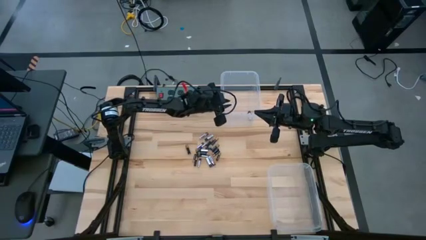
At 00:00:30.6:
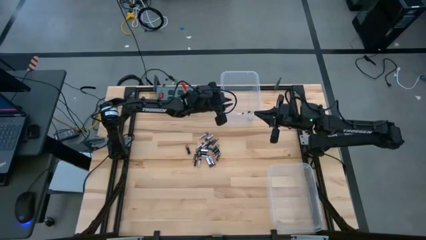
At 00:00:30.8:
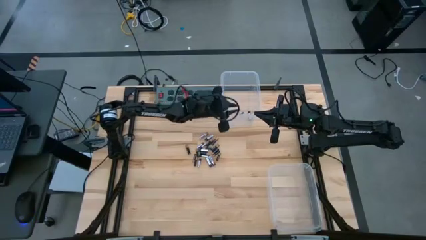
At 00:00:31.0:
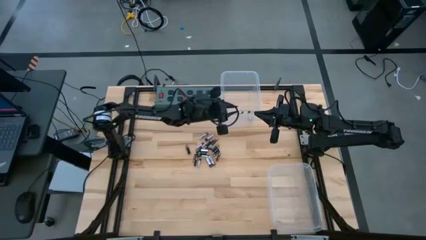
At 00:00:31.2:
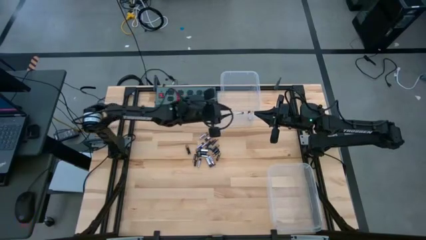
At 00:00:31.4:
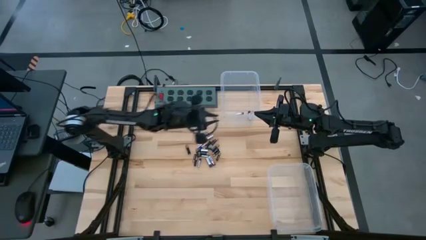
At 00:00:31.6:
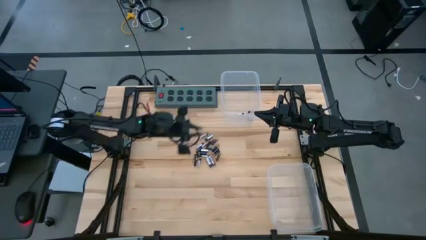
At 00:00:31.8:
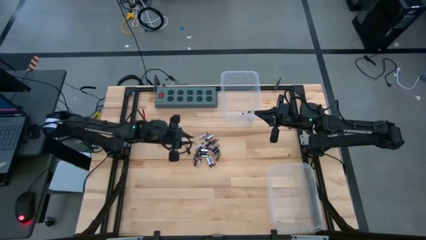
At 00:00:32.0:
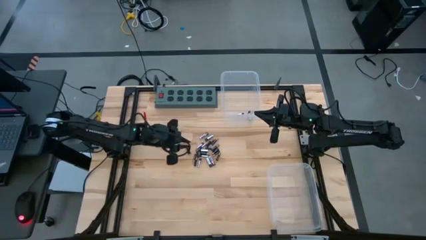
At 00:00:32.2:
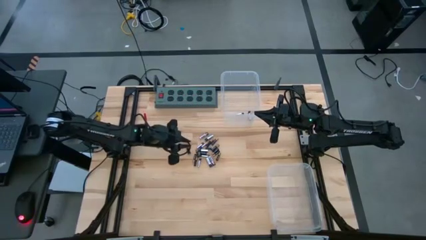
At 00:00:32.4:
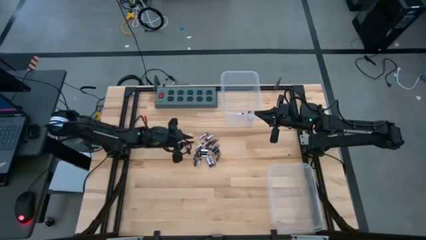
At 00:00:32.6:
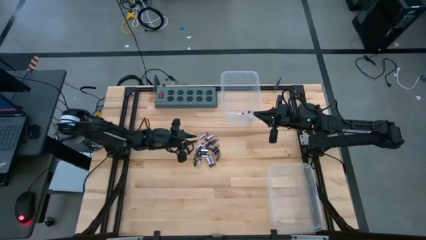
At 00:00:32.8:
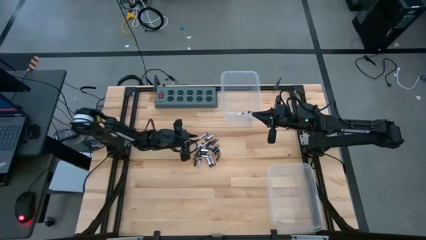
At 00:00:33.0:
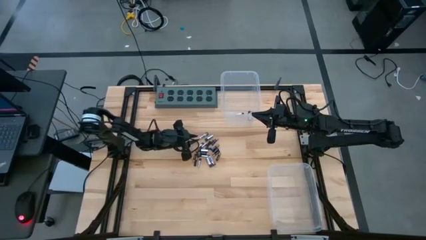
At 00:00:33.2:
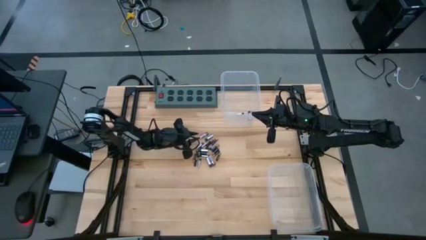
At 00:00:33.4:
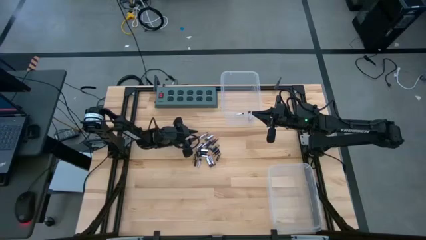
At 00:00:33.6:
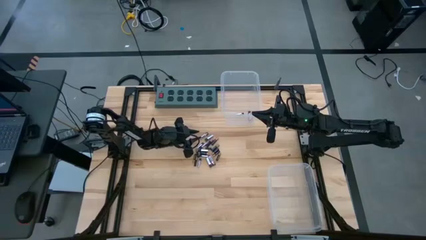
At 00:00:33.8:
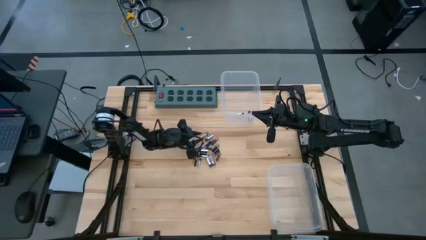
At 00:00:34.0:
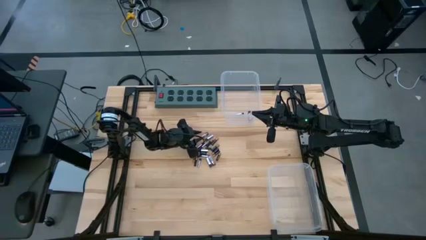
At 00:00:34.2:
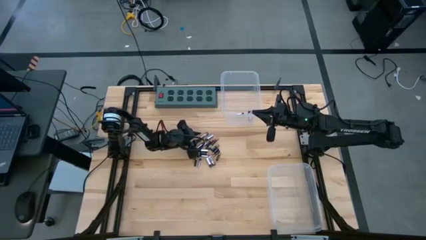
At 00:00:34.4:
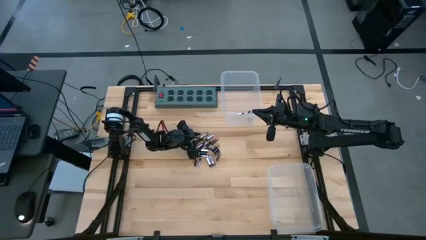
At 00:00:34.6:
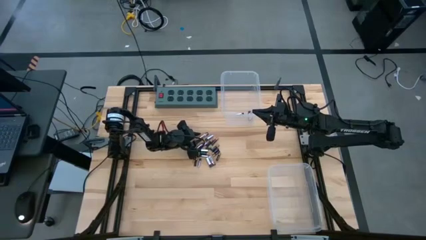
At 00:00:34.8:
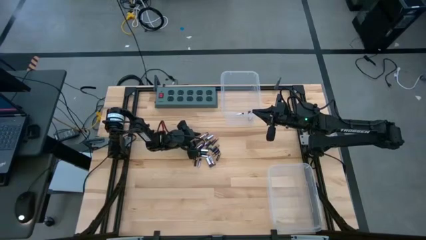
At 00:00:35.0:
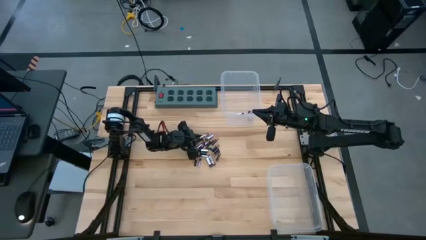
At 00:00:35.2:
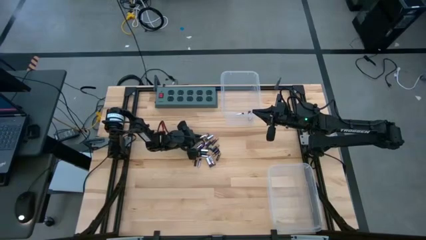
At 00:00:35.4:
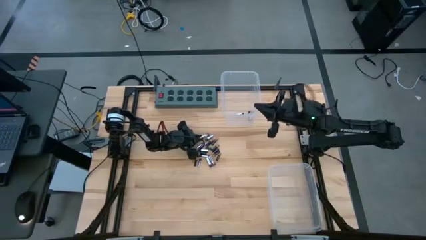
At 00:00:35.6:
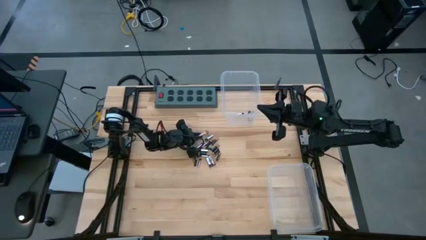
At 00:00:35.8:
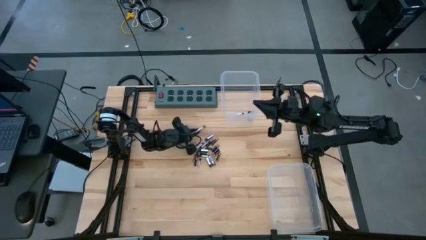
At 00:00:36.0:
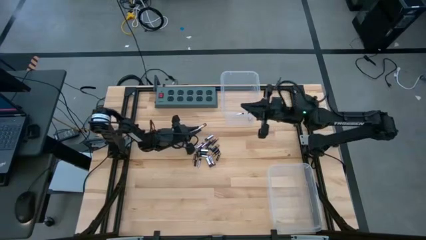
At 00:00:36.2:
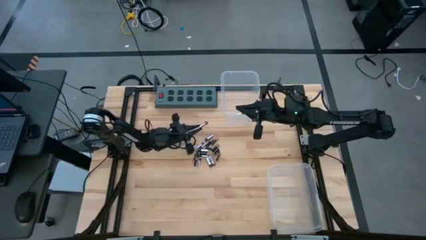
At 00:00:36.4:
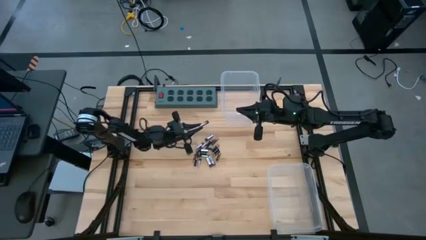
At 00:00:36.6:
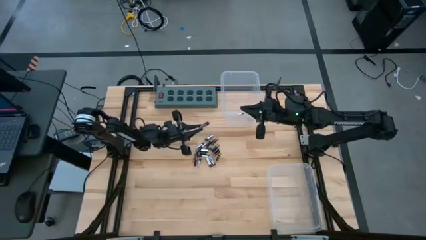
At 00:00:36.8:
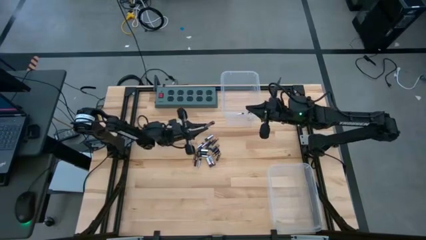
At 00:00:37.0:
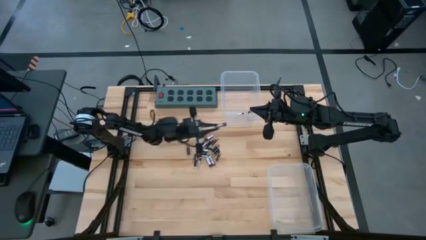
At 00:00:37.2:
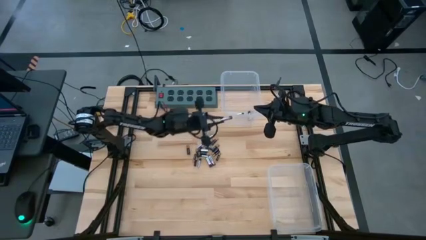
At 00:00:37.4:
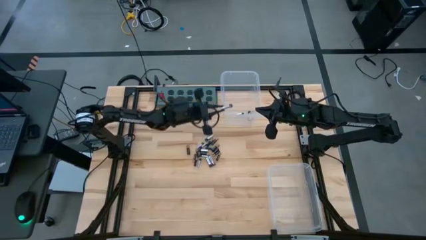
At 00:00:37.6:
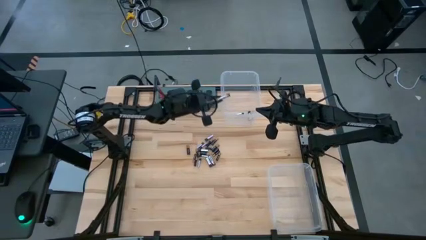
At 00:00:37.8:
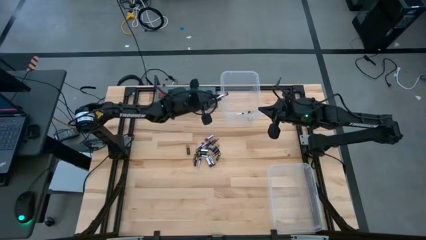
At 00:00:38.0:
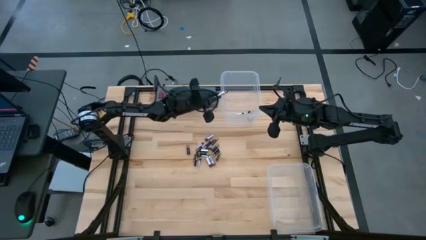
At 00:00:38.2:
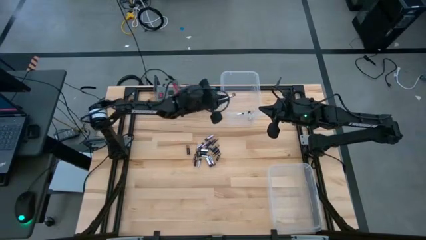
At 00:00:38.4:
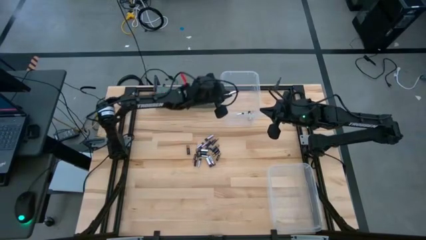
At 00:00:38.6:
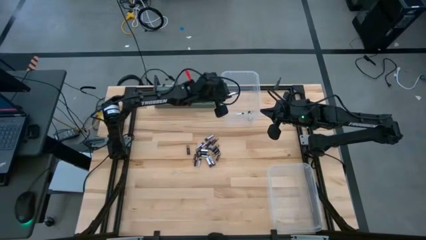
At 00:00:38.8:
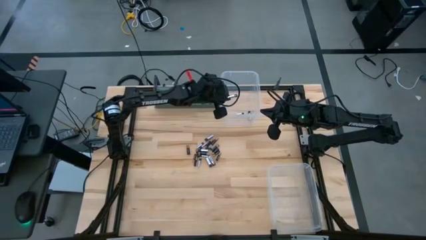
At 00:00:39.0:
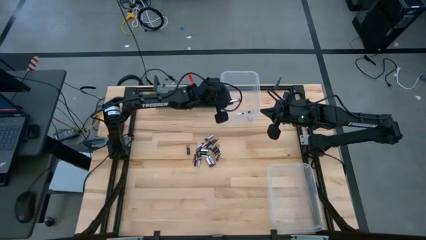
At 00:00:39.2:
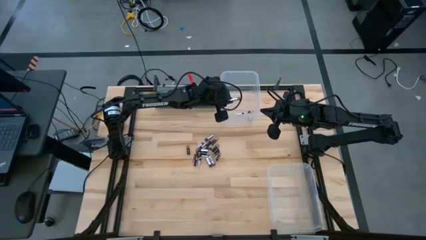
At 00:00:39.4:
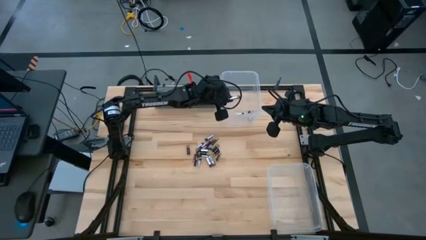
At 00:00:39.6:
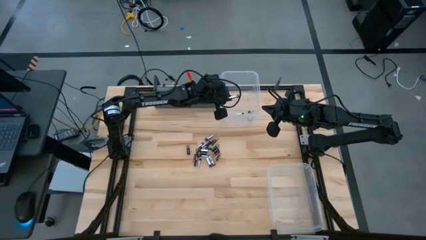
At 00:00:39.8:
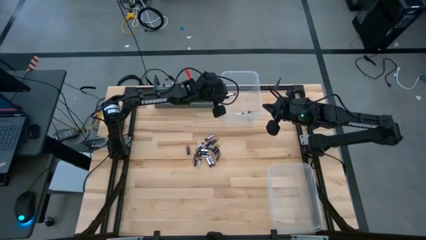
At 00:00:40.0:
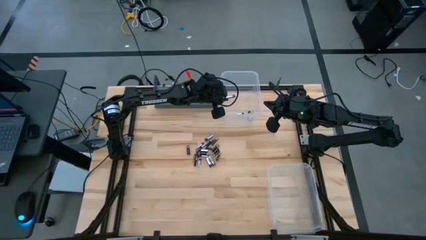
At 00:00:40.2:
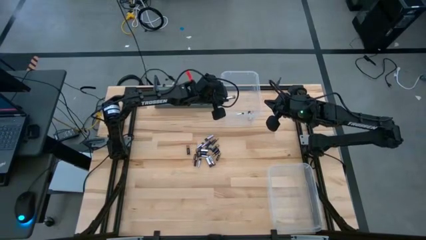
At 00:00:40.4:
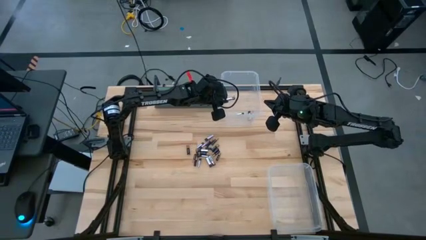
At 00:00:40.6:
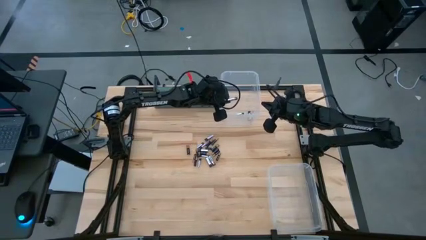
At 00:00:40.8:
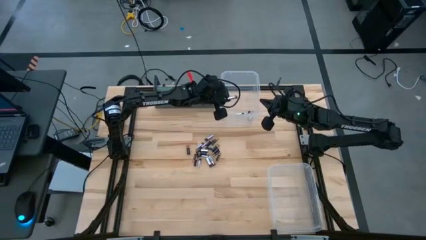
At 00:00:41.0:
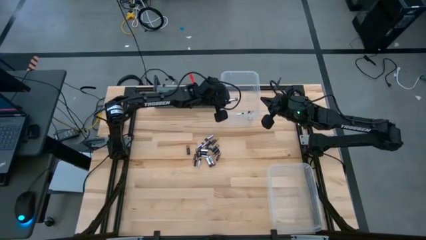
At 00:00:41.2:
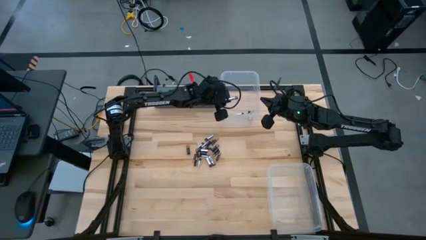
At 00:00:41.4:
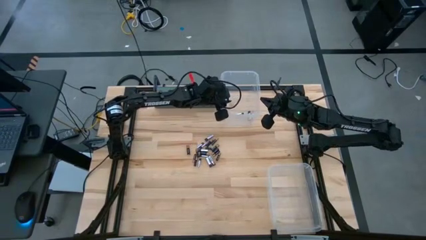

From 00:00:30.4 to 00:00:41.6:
Task: Sort batteries
Put the silver battery into the top transparent bin

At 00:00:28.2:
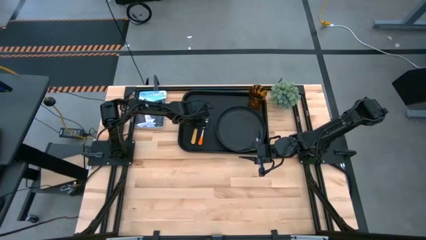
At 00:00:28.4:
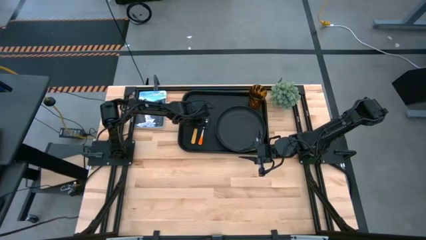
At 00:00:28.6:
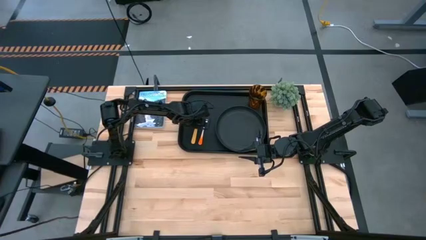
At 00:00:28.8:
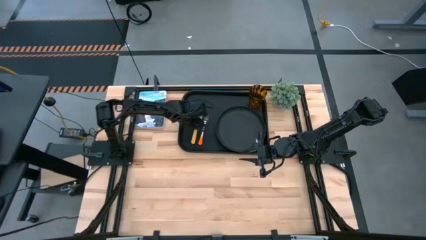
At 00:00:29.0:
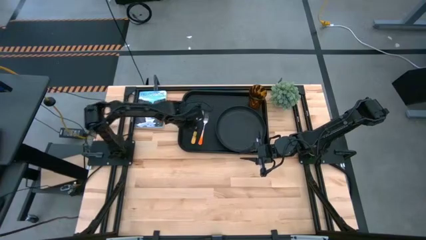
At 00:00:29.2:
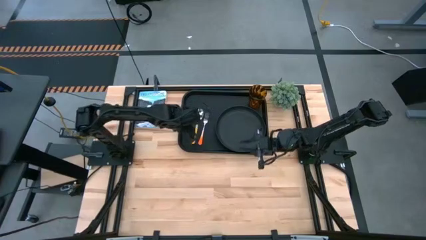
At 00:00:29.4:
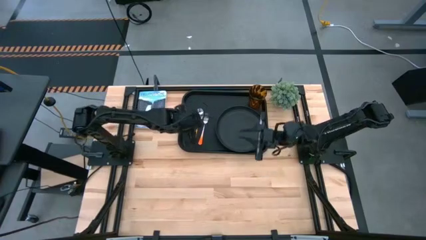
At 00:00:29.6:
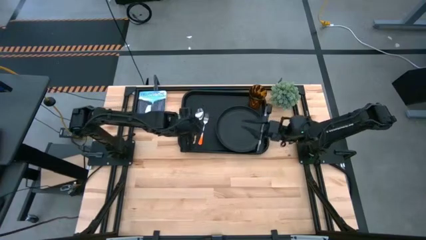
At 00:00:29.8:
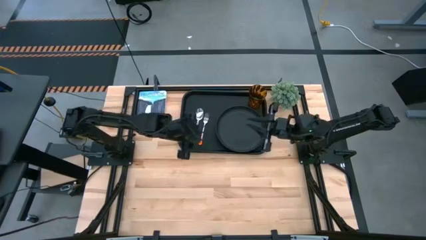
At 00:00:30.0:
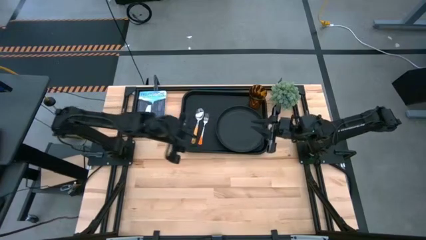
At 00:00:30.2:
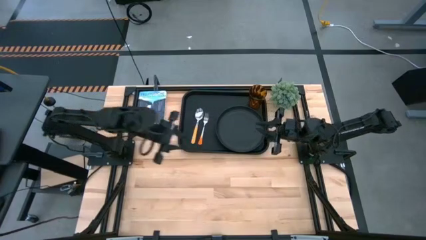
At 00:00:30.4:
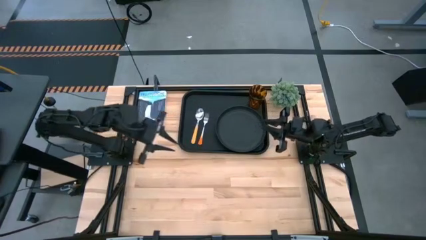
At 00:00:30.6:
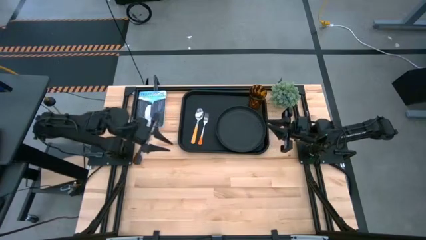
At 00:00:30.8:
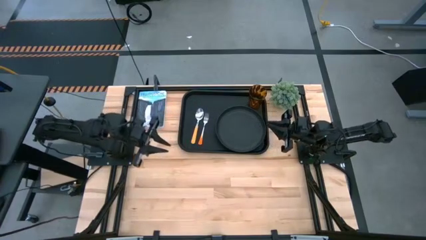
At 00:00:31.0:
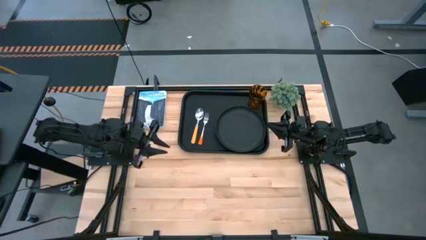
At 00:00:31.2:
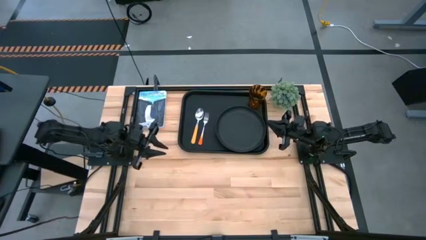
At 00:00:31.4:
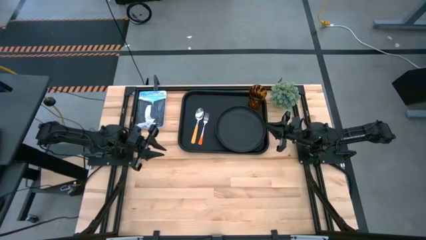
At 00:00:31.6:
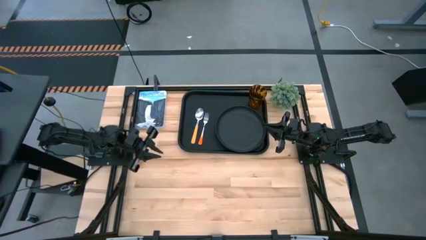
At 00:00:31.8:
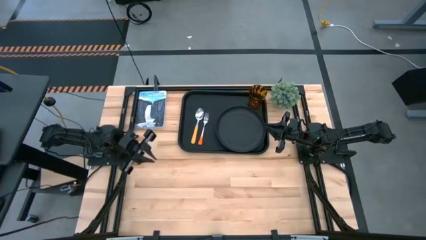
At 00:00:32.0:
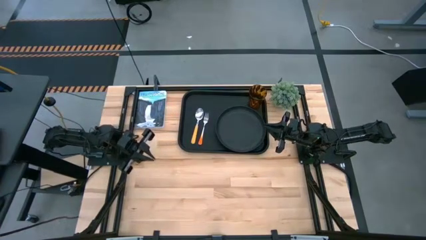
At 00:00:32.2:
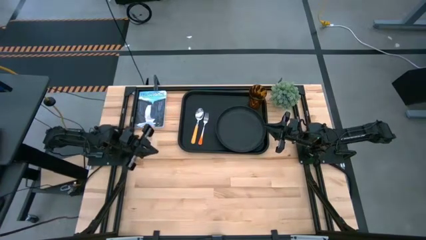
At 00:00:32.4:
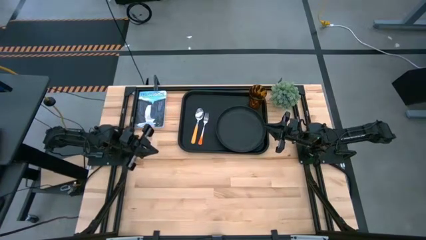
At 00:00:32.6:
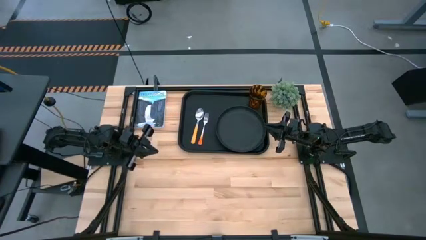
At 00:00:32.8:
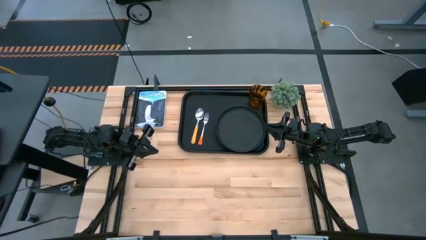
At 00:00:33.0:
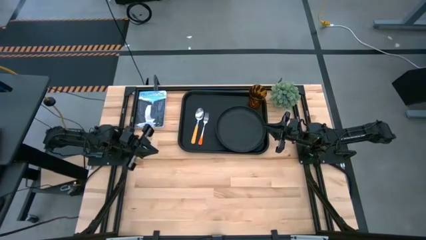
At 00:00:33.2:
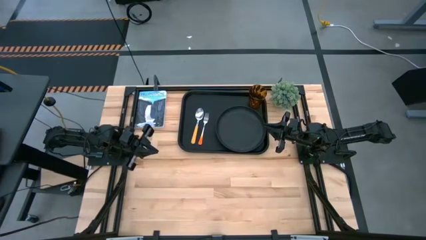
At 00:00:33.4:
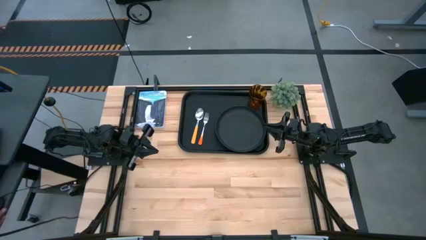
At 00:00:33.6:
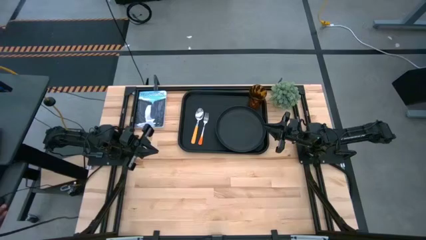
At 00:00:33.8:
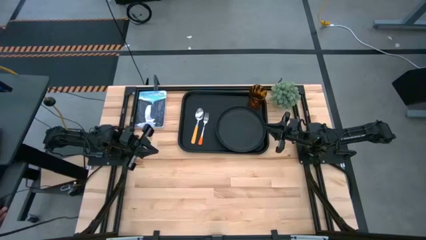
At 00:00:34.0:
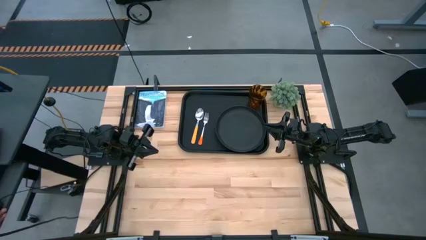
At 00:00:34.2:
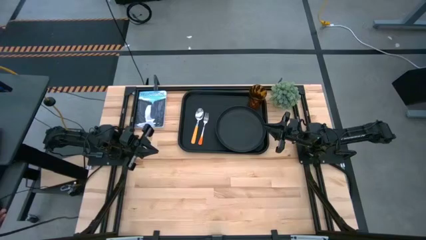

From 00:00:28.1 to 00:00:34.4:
Task: Pick and place plate/cup/fork/spoon on tray
Return to Home Position
